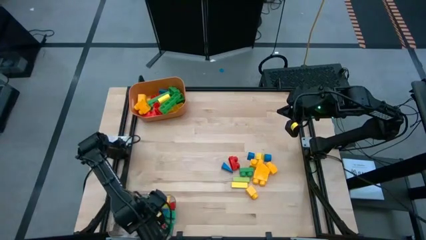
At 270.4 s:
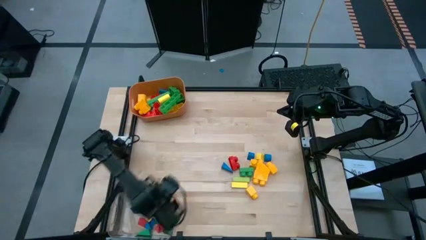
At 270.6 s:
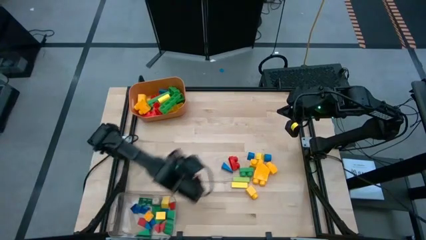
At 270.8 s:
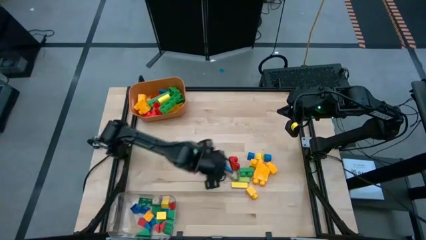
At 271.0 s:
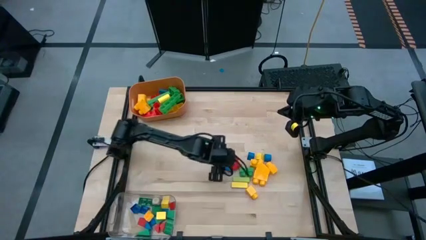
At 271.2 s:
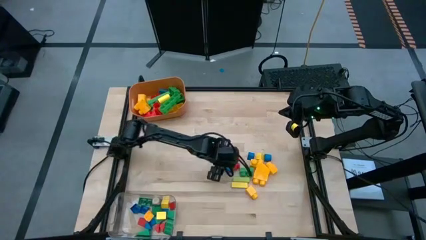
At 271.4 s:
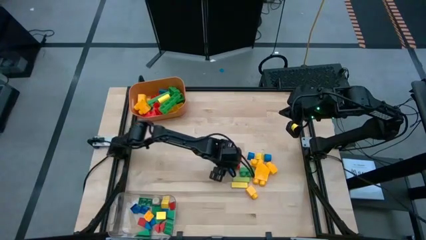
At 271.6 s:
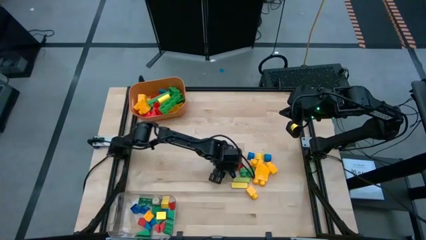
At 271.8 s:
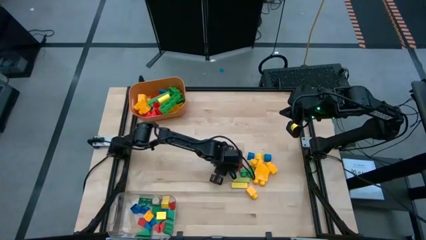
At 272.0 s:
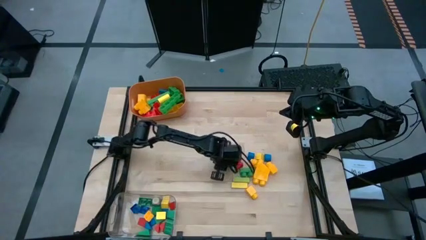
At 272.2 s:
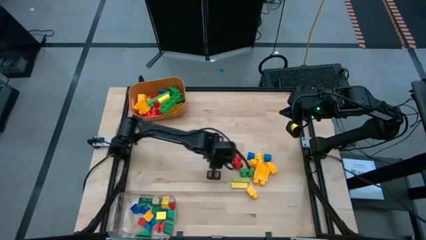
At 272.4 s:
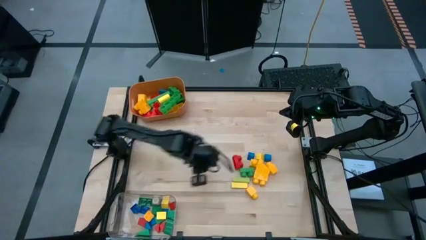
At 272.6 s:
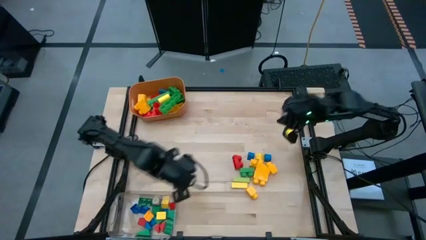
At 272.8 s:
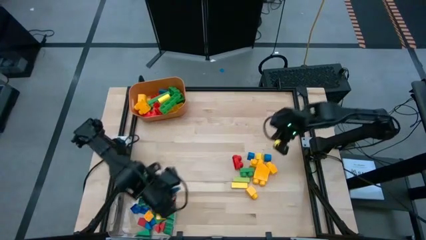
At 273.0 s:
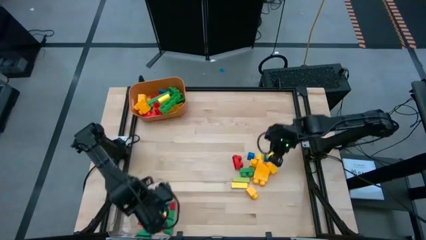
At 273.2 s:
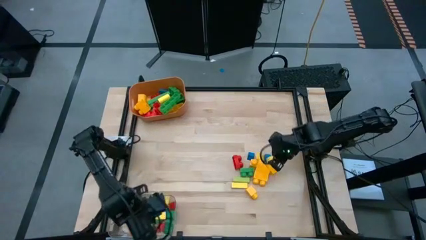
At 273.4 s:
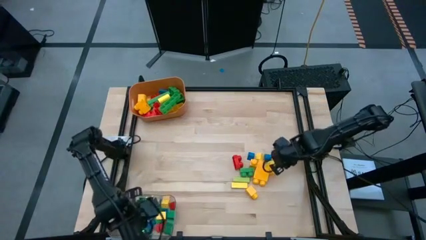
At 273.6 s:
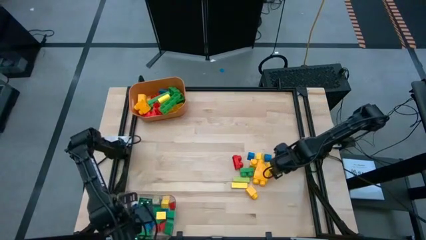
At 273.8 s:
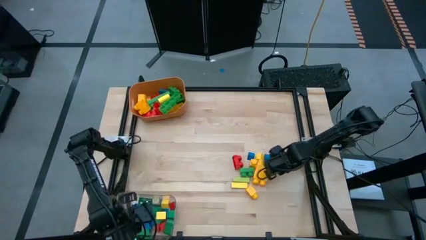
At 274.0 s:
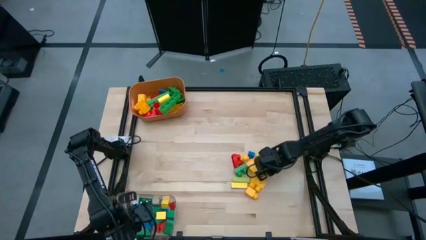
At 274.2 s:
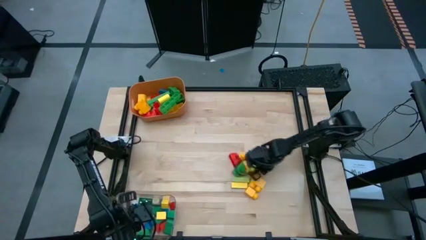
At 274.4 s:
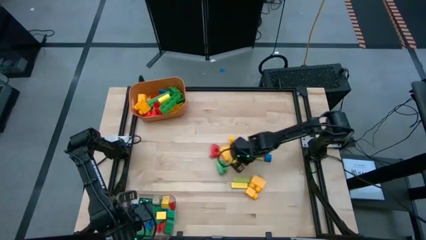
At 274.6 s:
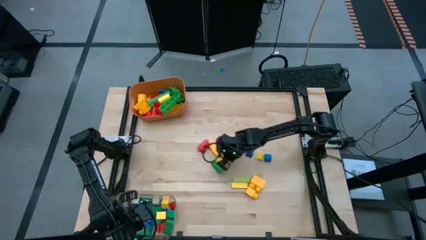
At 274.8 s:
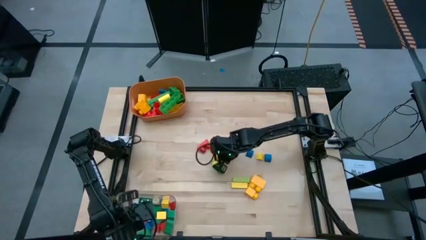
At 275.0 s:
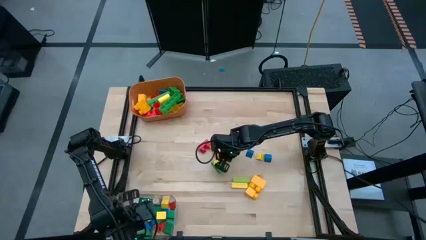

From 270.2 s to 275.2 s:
Task: Sort blocks by size
Put the small blue block into the transparent bin

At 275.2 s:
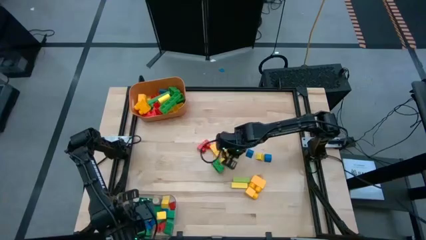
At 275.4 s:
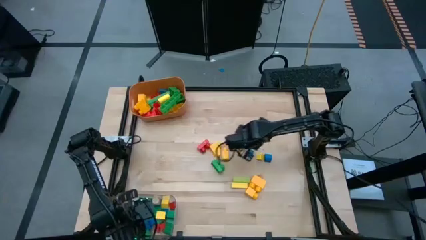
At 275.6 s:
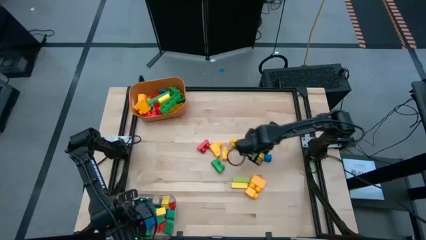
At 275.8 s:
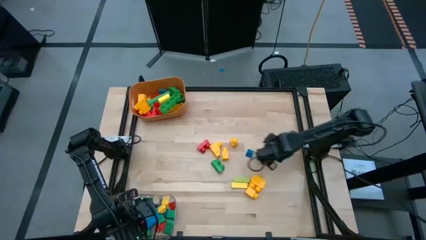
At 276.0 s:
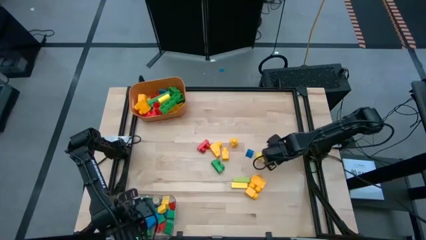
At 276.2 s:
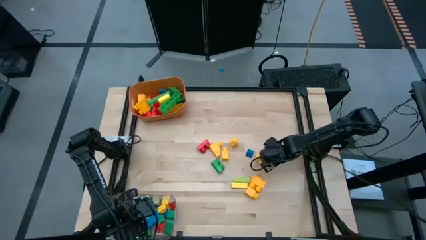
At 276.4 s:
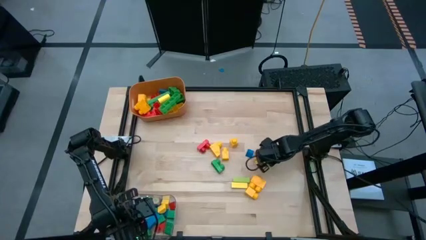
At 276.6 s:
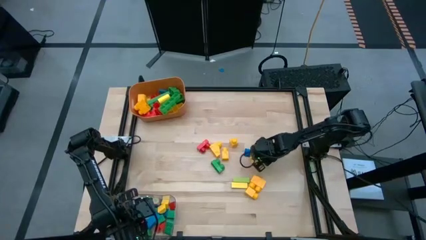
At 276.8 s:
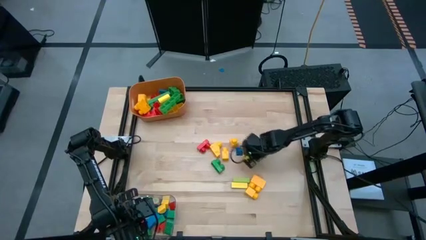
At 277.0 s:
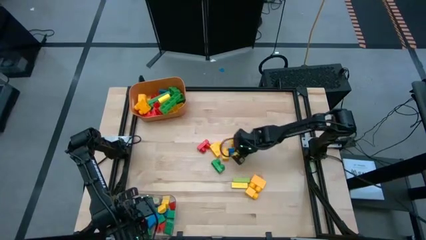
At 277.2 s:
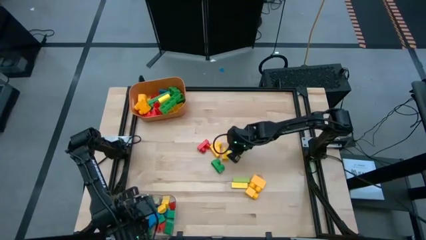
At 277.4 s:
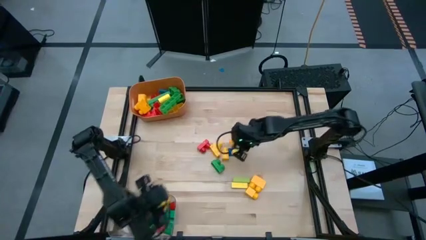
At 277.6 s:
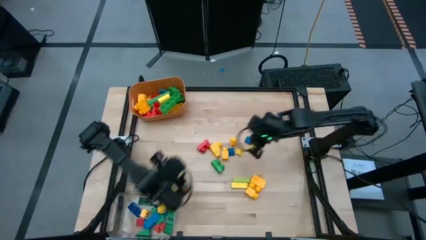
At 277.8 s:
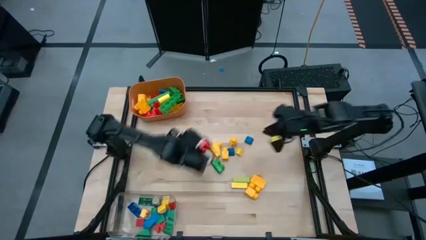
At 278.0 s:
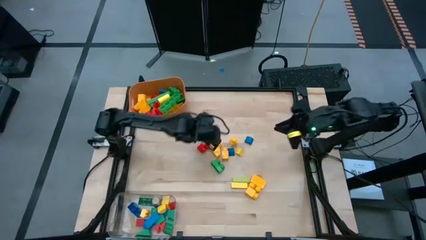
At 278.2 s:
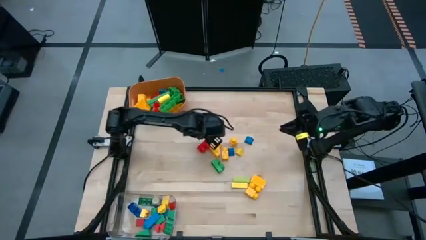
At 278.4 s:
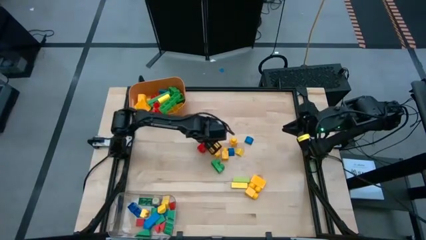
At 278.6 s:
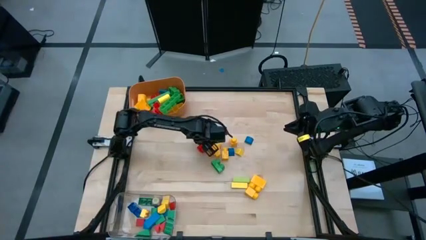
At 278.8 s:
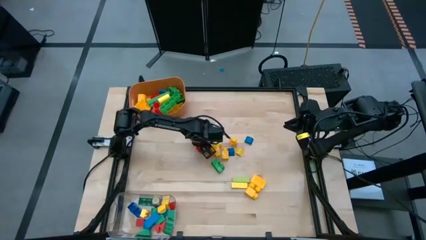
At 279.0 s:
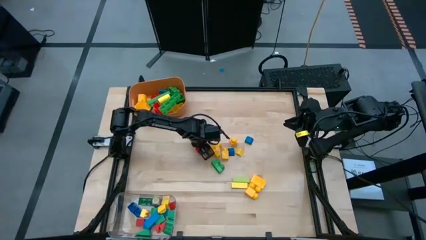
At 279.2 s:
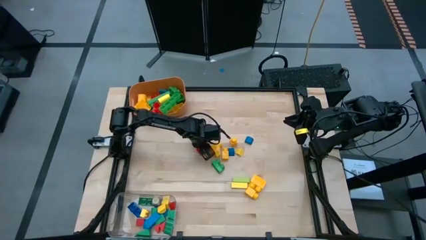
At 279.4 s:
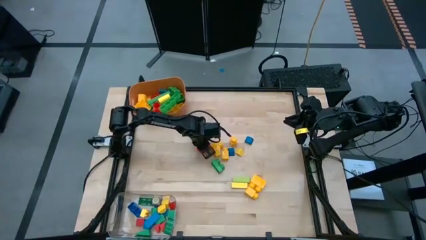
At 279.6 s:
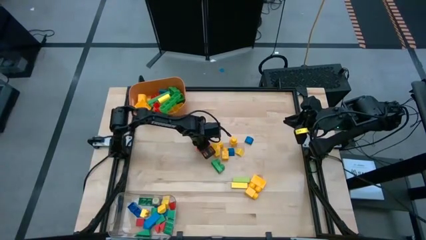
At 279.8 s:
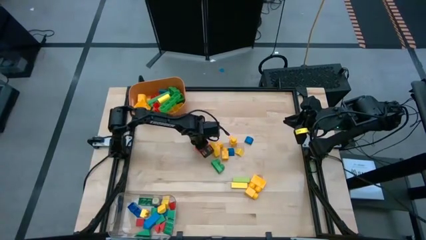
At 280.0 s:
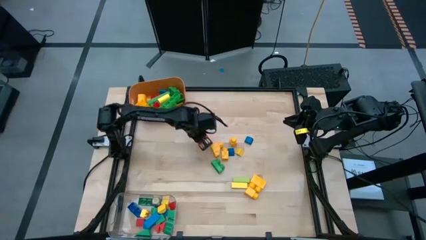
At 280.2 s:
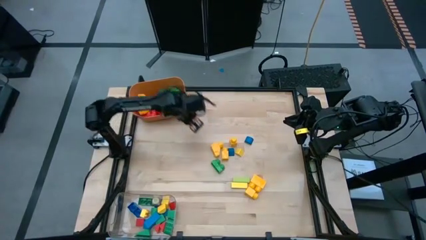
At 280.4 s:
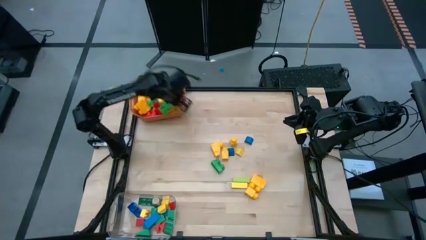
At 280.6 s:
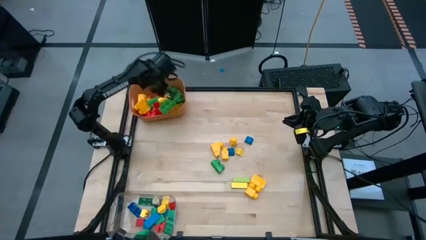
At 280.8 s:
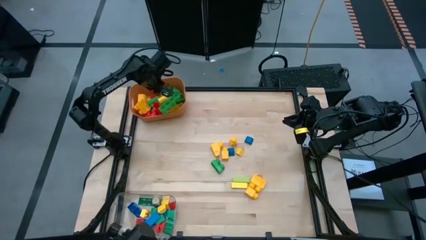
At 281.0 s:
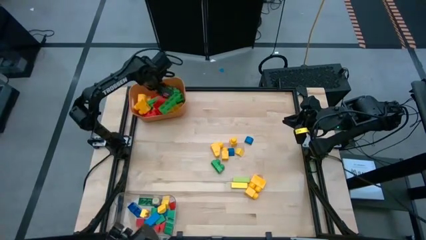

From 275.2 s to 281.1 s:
Put the big red game piece into the orange bin

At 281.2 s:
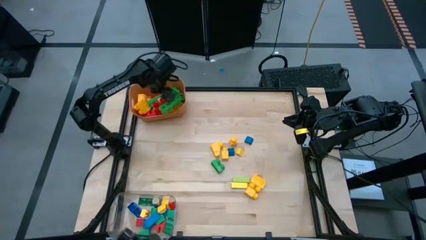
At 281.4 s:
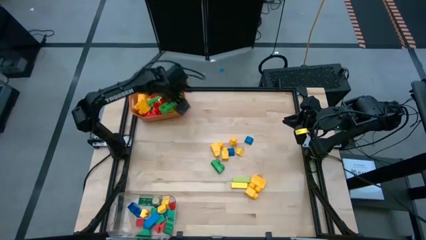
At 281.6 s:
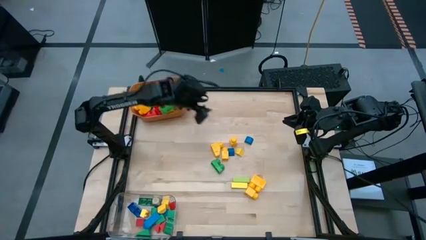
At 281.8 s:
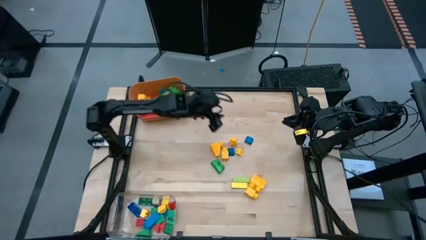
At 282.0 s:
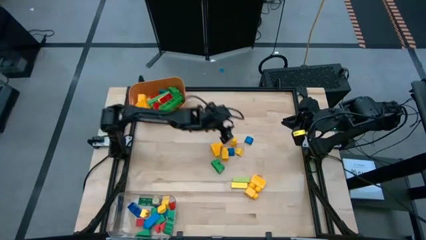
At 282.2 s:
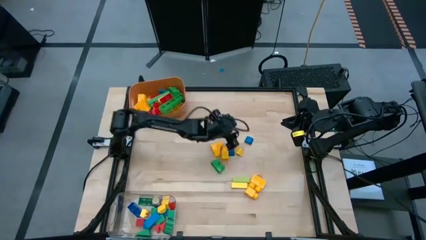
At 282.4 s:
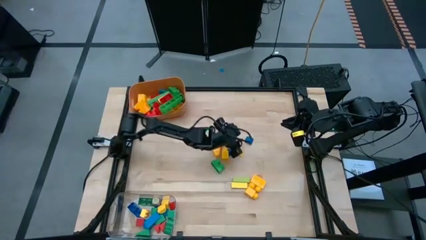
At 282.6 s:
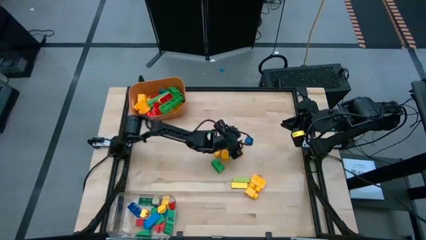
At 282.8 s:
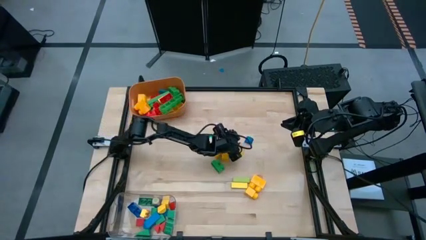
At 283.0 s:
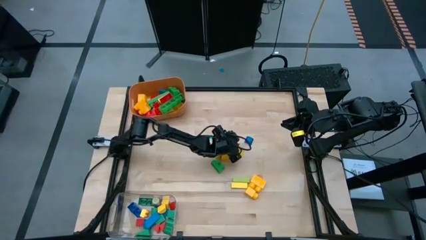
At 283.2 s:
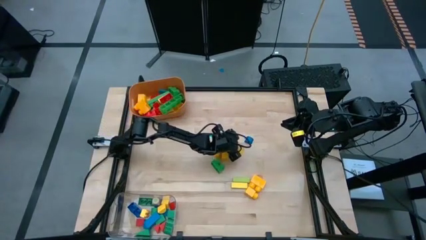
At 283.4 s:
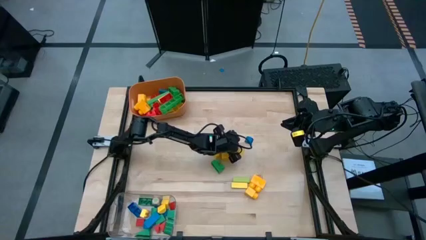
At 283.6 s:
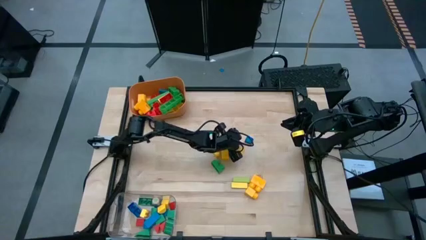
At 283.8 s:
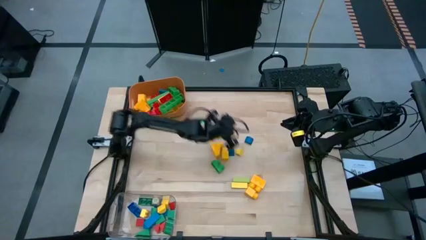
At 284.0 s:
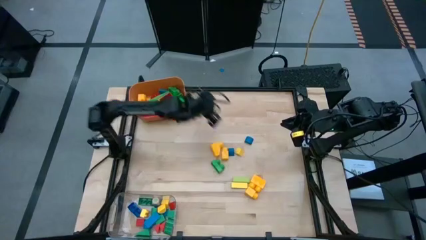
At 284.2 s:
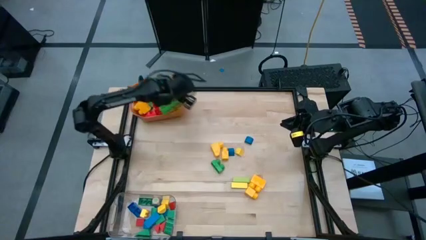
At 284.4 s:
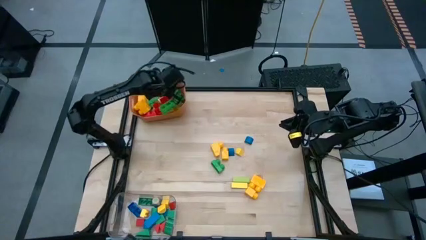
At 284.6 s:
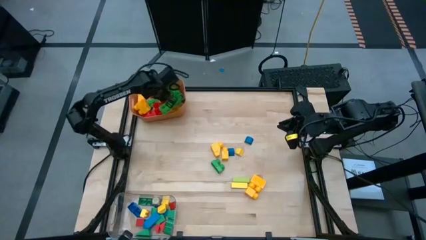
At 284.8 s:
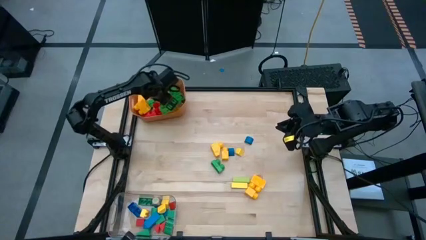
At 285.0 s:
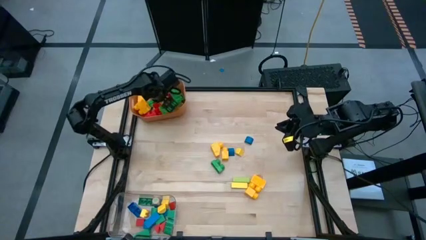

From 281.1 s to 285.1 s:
Put the big yellow game piece into the orange bin
